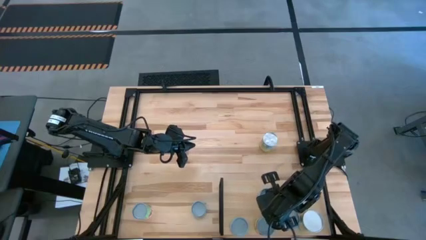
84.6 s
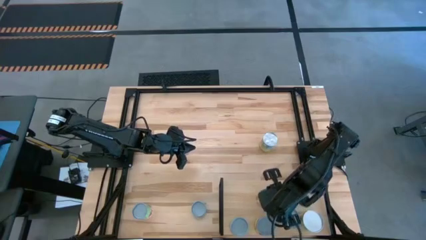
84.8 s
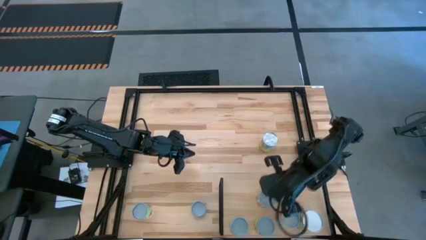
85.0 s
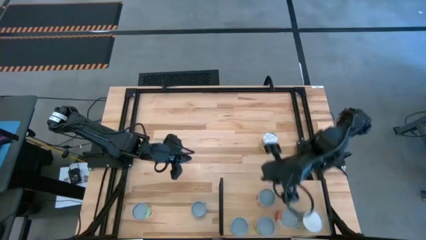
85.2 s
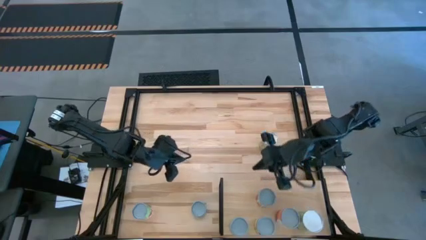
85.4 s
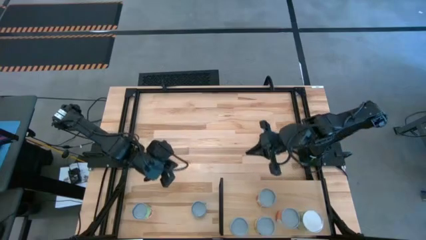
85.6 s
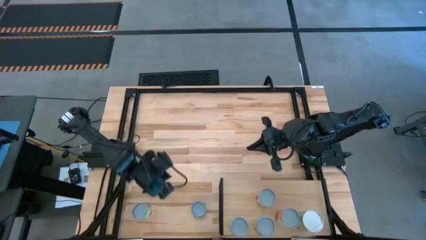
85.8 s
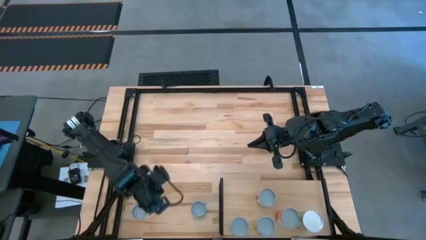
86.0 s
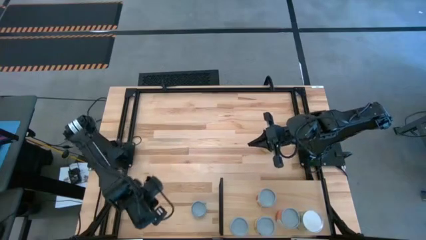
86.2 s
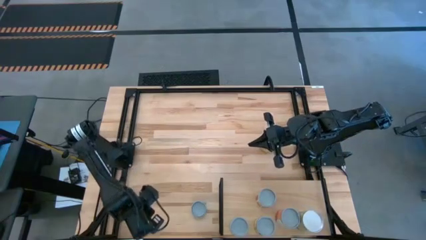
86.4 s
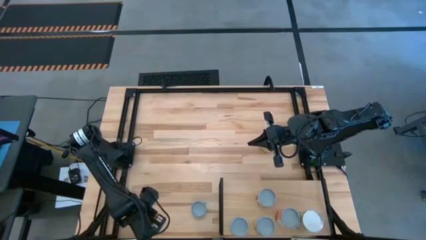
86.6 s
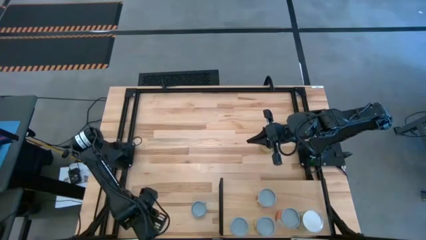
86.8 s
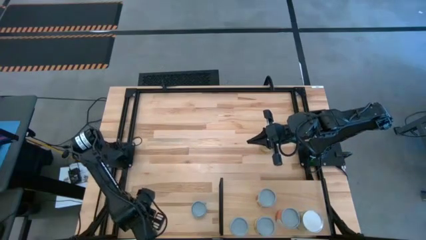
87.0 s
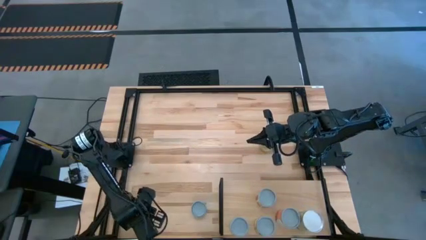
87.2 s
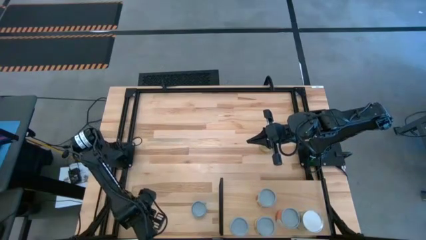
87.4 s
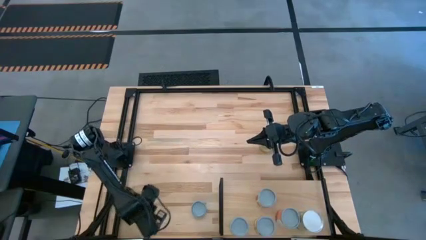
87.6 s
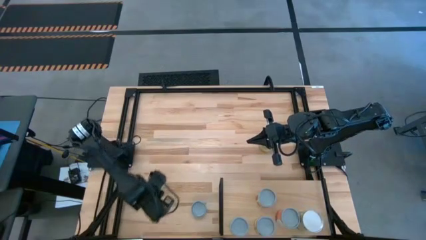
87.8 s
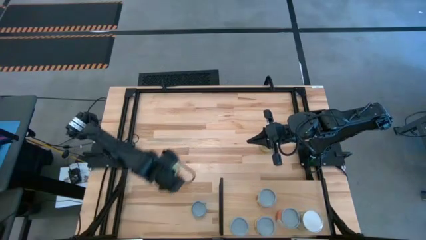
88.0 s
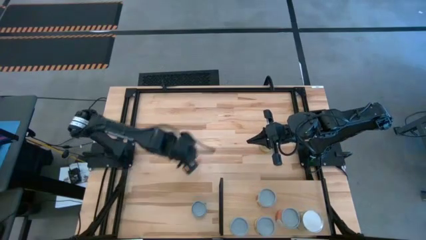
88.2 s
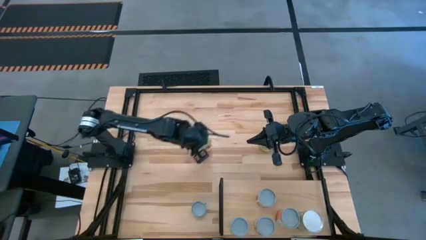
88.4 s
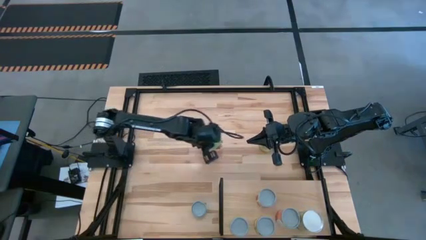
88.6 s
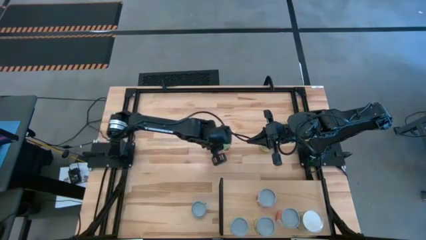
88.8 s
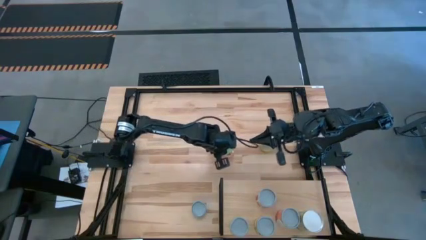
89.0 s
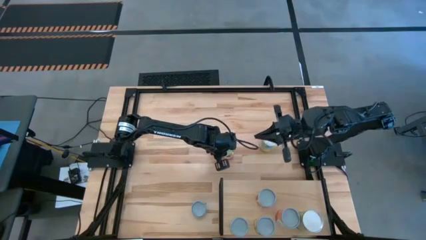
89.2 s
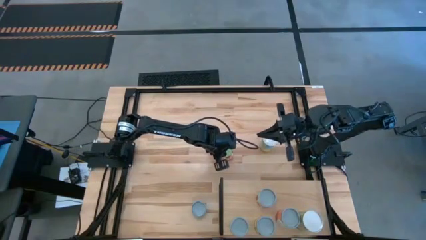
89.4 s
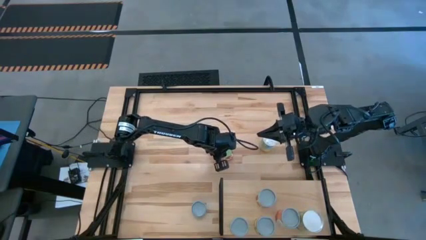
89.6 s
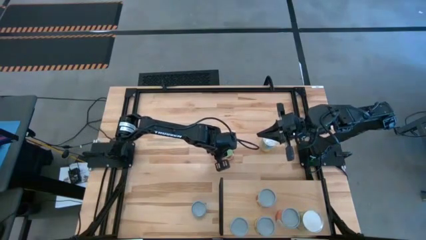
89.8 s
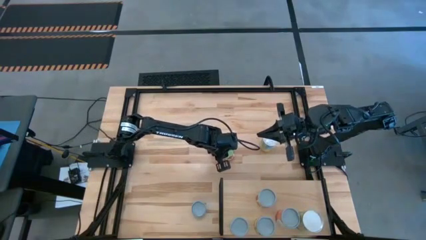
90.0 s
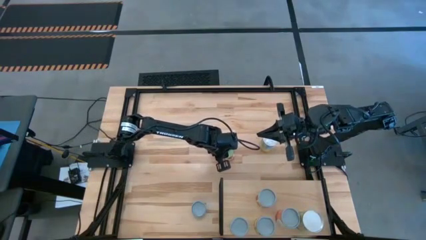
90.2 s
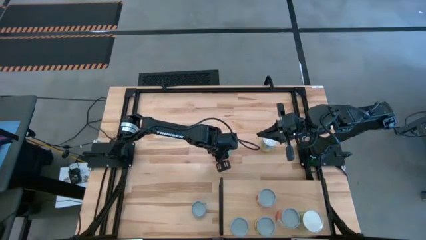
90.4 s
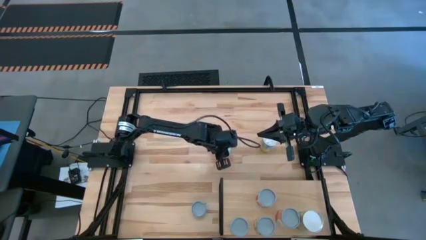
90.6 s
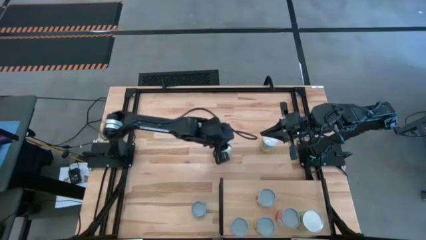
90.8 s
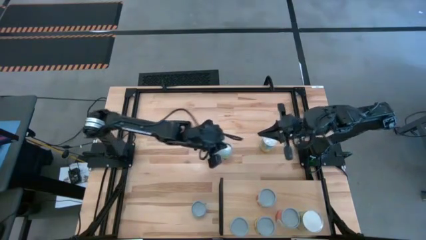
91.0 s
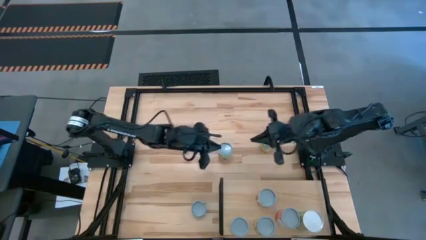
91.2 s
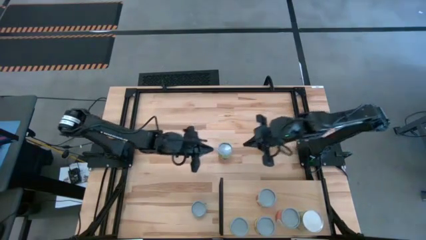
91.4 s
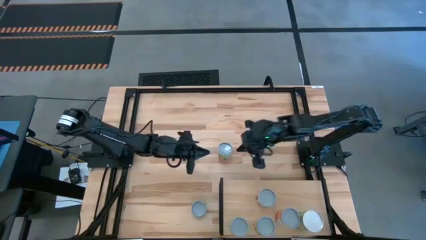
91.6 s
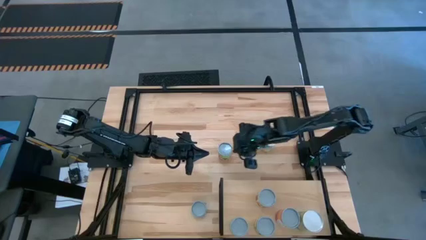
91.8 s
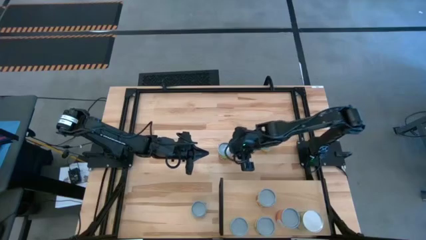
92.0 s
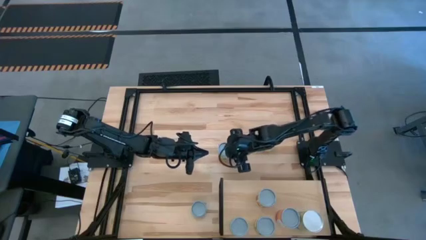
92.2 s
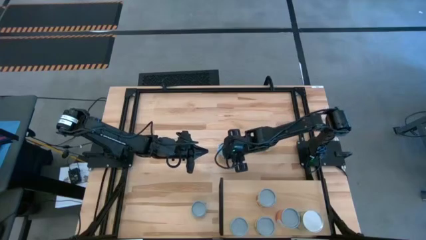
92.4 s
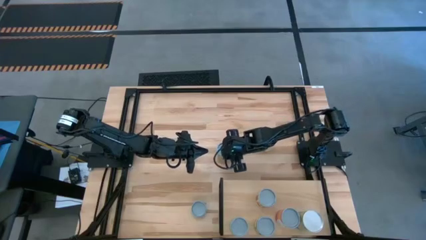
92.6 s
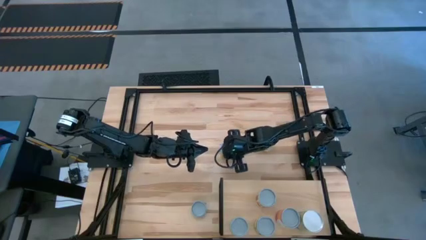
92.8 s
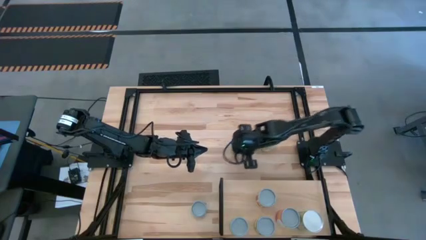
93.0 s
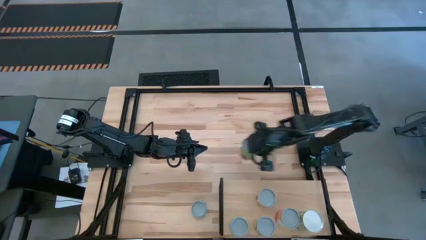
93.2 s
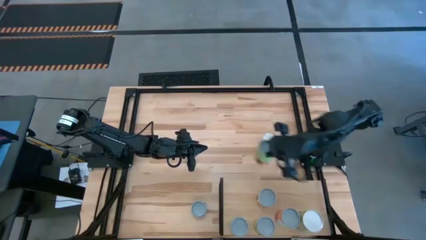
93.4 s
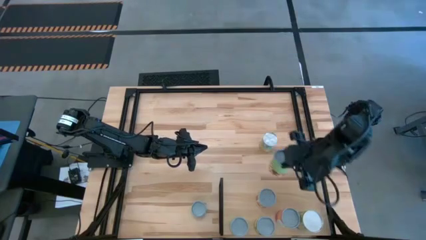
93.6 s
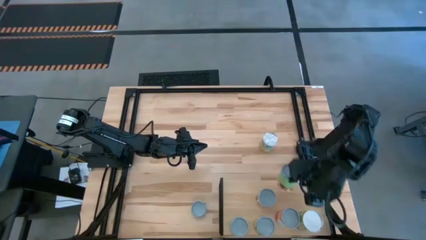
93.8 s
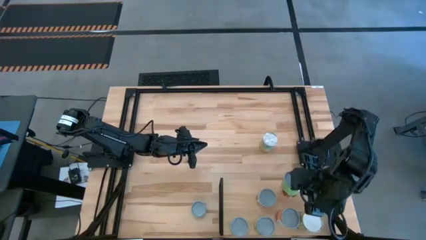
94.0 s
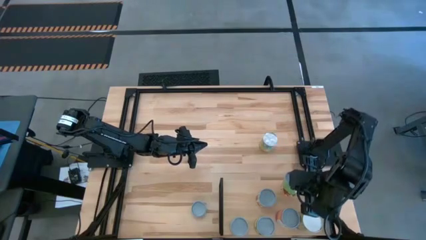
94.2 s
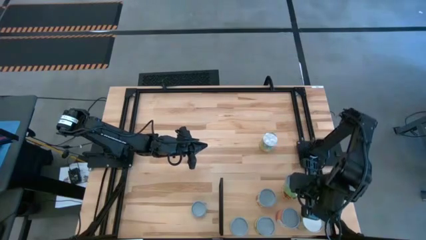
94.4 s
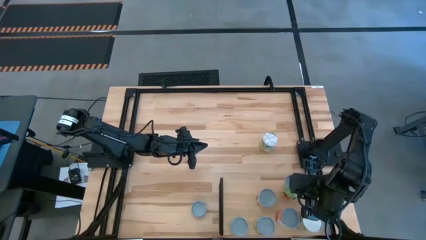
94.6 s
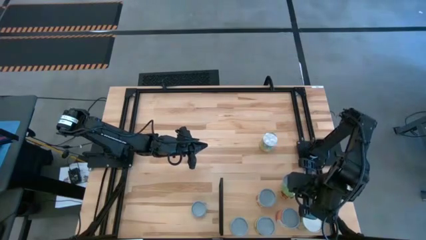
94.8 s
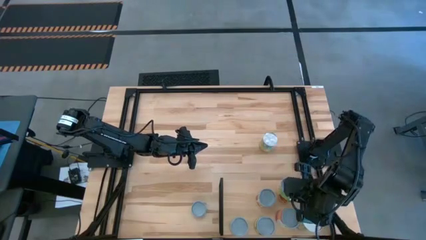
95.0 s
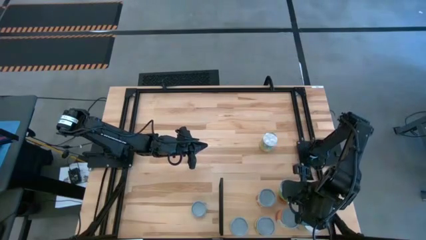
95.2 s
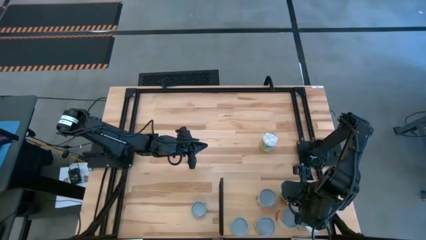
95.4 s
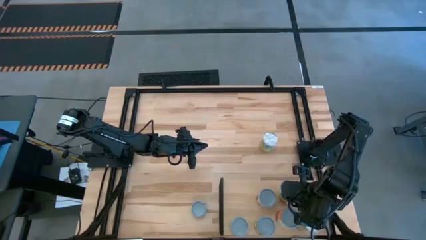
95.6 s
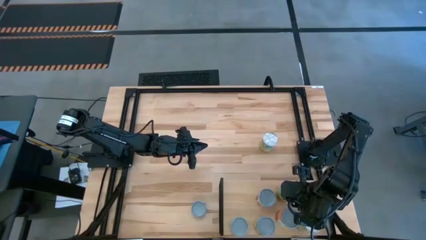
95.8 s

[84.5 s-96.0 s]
Task: Pick and place cans onto a shelf
Put the canned spaghetti sauce on the shelf

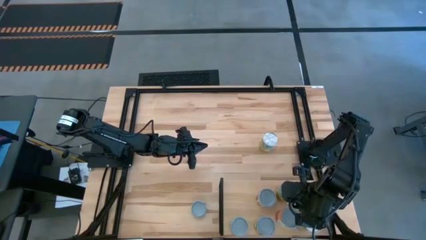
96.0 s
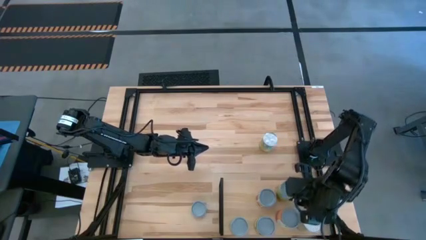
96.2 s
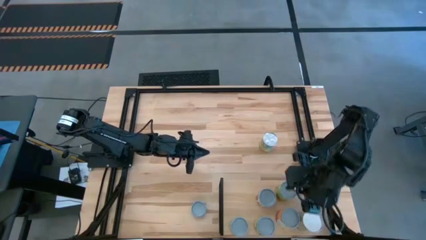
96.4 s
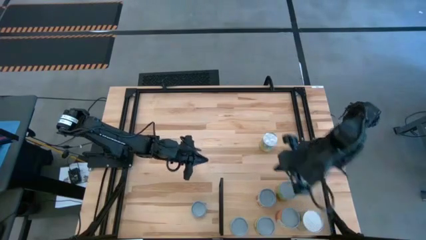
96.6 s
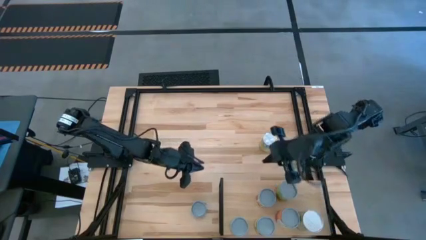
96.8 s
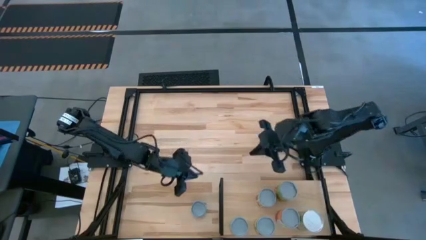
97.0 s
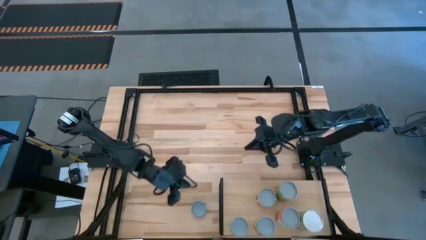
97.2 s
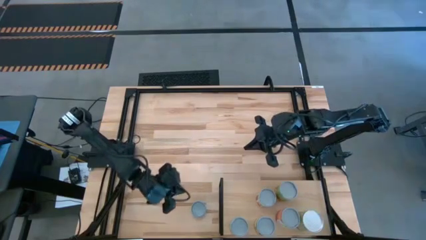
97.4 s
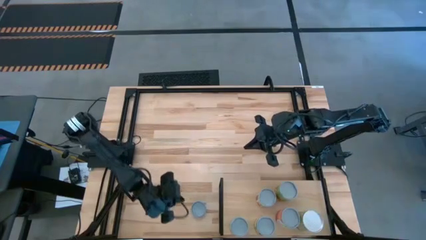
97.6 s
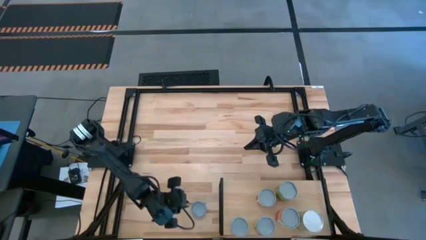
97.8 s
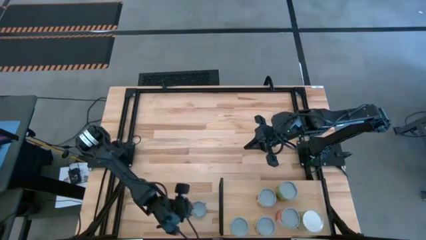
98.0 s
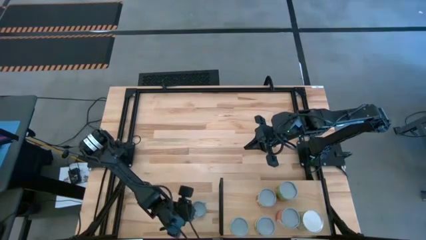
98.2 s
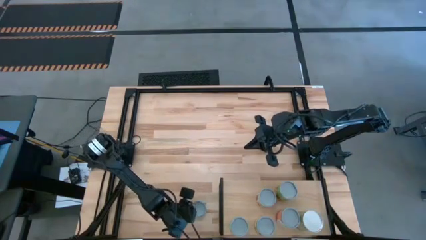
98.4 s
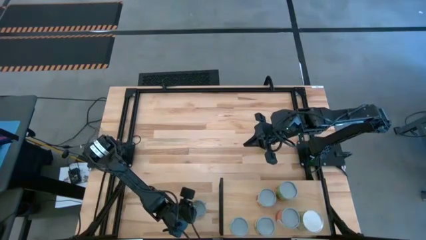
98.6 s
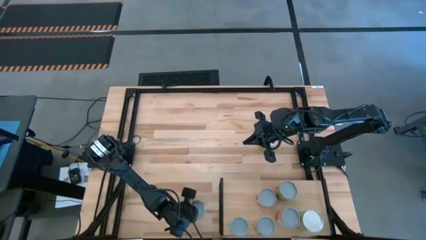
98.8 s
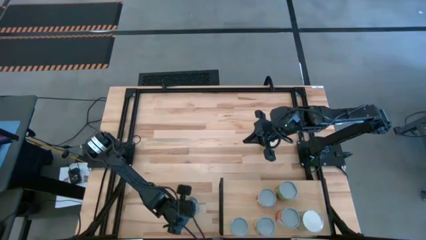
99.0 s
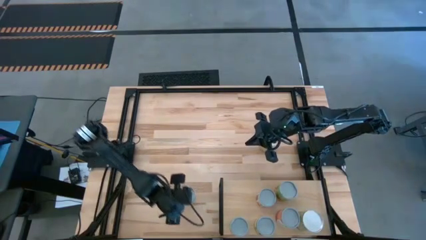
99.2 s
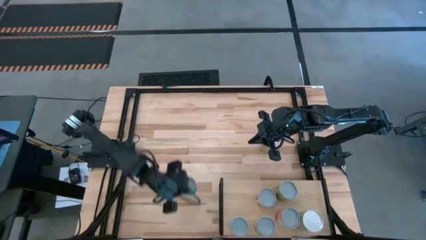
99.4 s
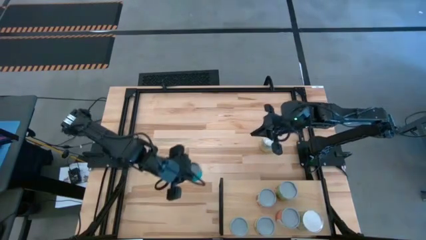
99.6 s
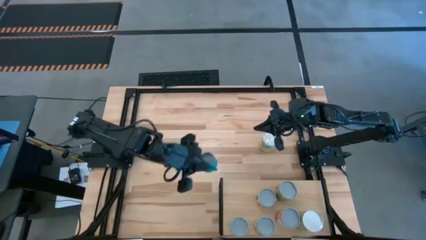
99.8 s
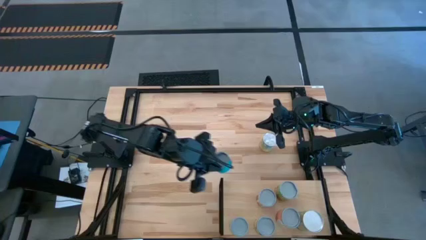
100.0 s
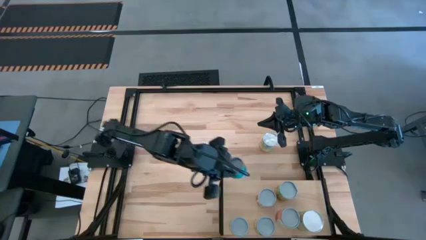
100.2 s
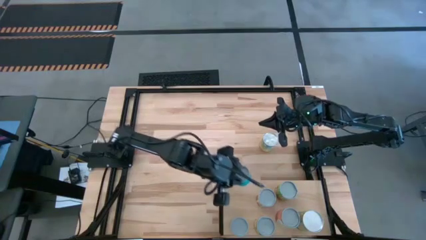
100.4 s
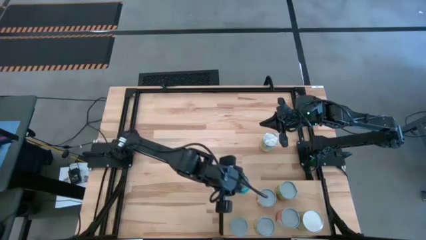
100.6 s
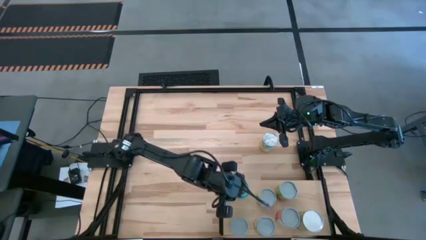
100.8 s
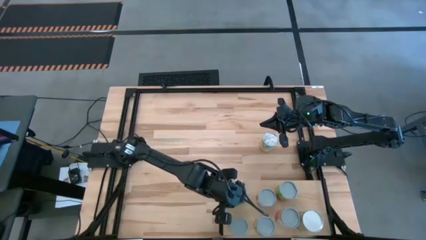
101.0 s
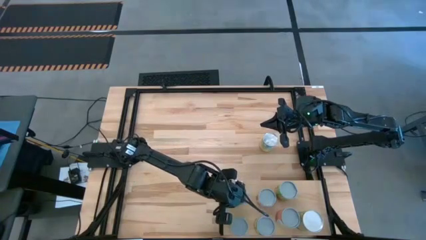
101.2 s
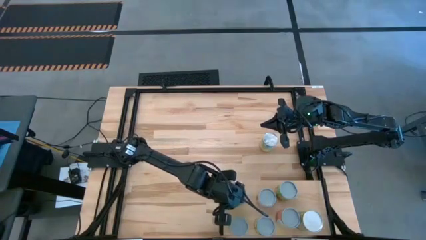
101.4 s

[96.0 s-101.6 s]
Put the canned tuna on the shelf
